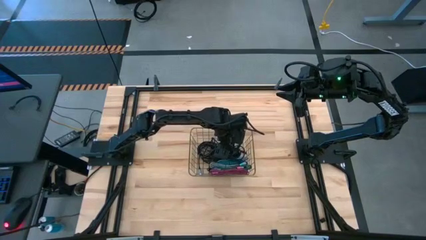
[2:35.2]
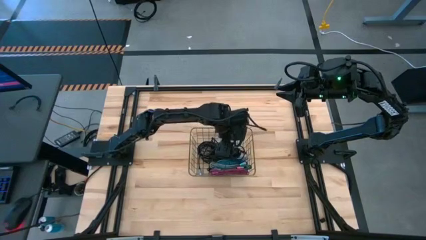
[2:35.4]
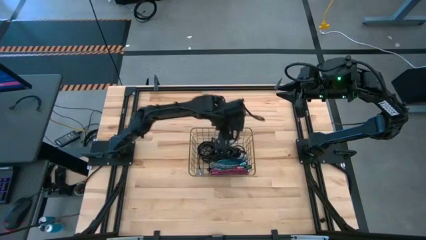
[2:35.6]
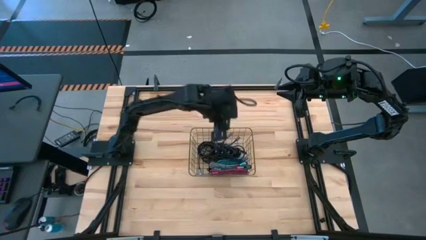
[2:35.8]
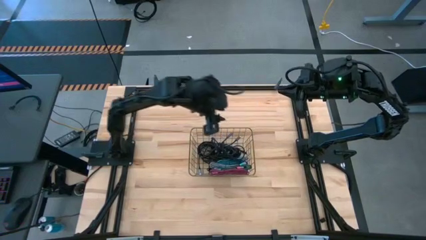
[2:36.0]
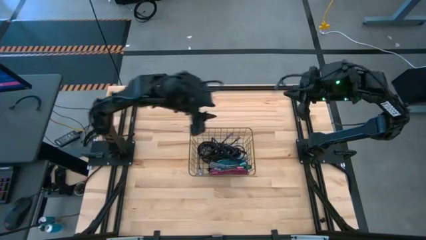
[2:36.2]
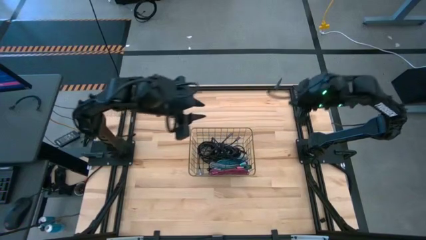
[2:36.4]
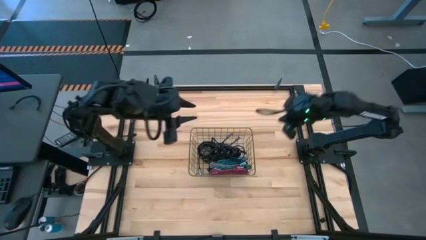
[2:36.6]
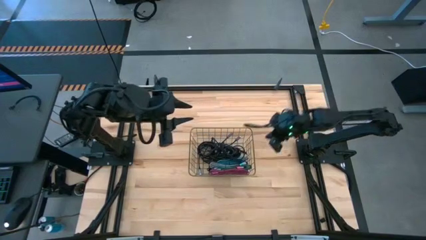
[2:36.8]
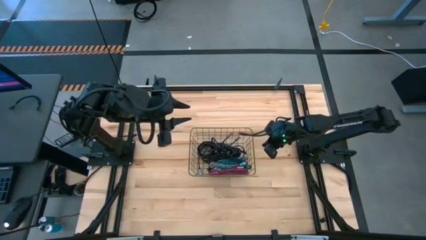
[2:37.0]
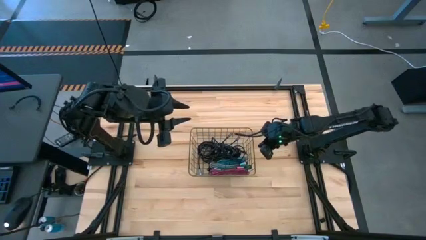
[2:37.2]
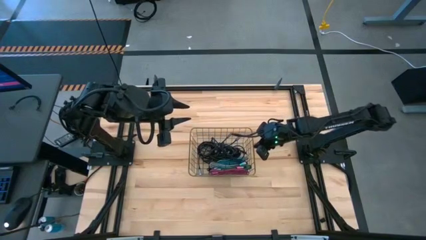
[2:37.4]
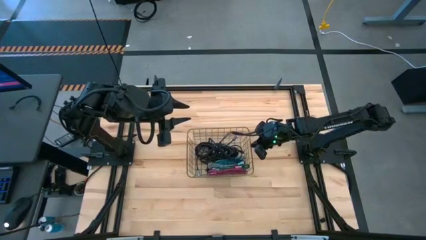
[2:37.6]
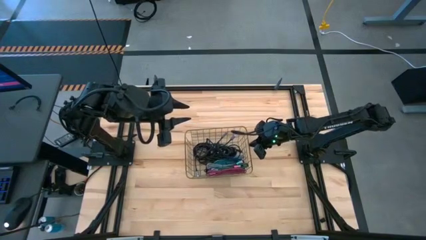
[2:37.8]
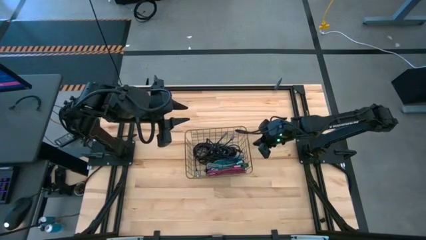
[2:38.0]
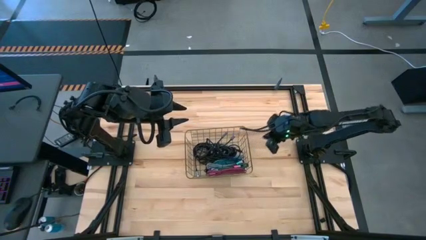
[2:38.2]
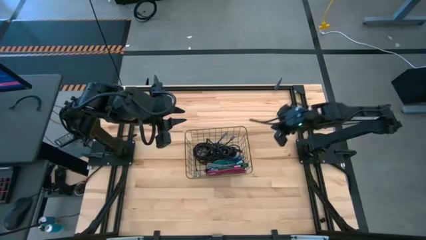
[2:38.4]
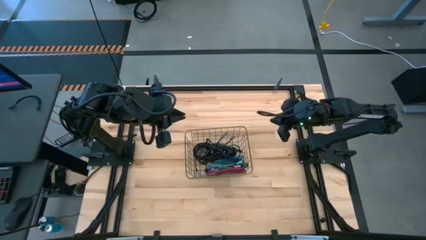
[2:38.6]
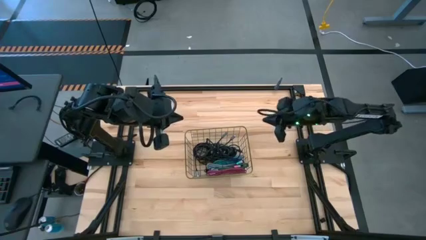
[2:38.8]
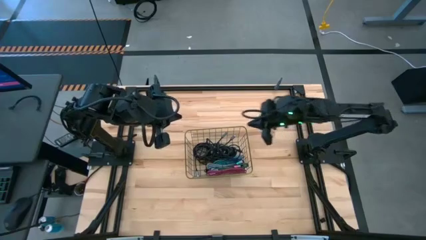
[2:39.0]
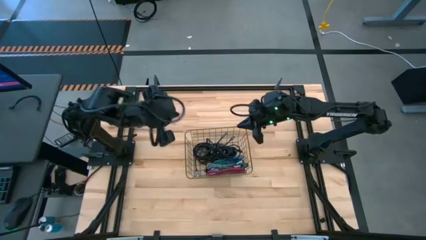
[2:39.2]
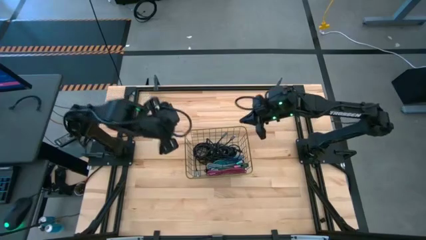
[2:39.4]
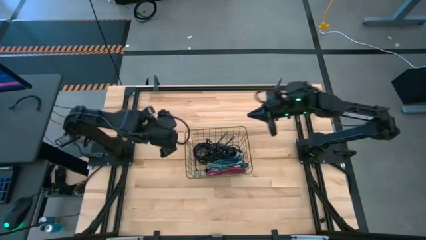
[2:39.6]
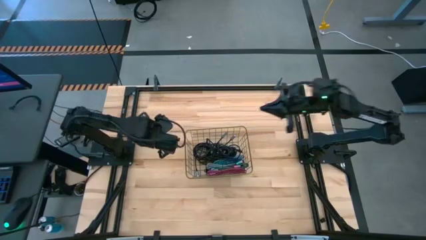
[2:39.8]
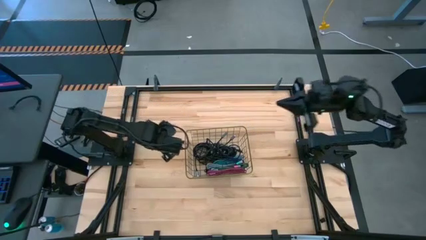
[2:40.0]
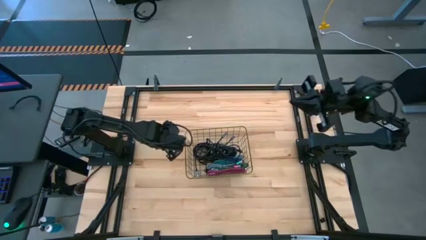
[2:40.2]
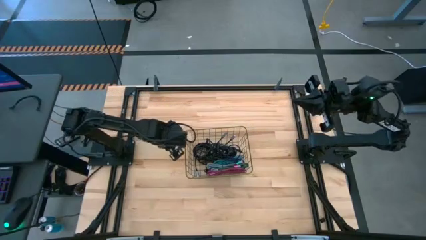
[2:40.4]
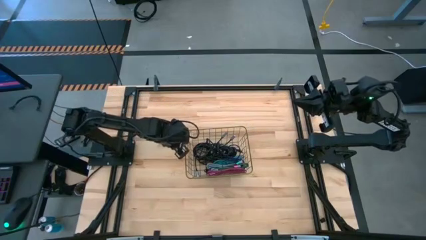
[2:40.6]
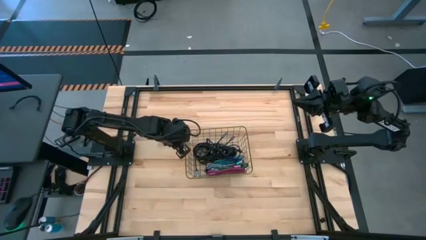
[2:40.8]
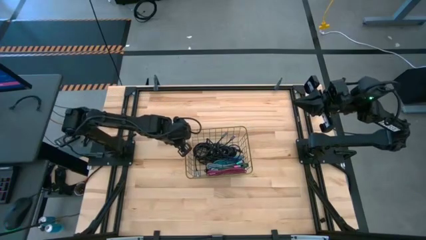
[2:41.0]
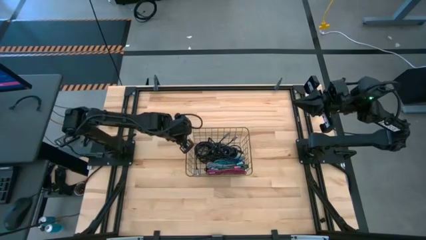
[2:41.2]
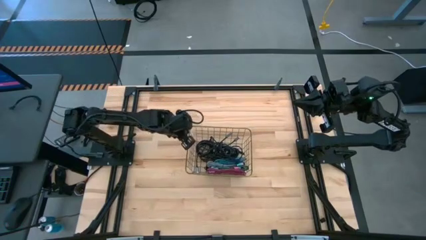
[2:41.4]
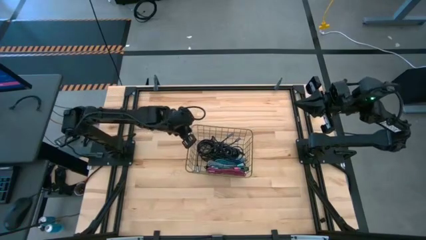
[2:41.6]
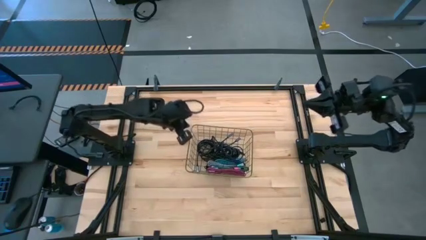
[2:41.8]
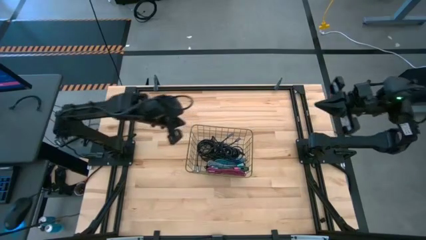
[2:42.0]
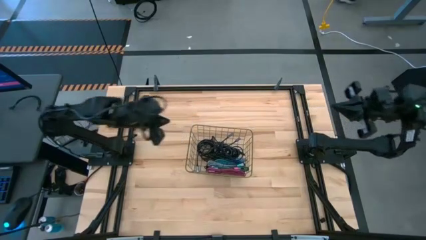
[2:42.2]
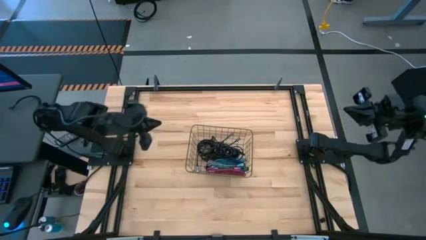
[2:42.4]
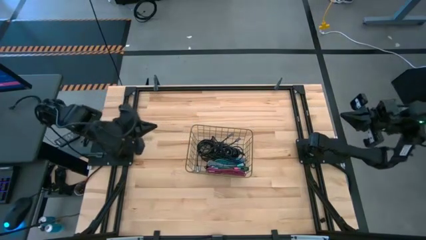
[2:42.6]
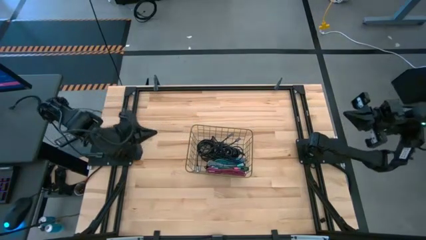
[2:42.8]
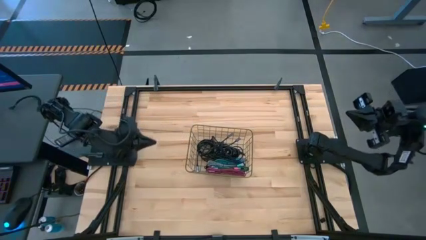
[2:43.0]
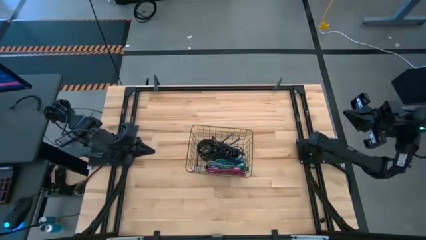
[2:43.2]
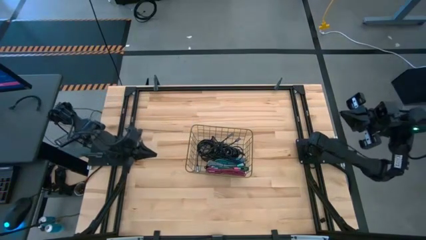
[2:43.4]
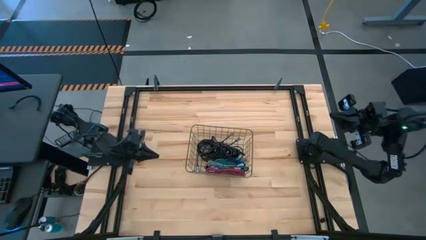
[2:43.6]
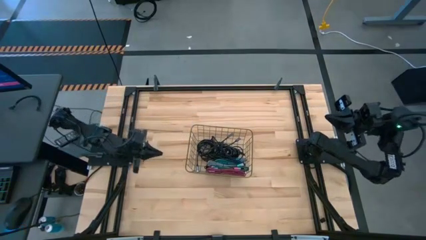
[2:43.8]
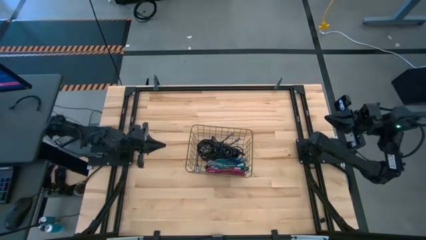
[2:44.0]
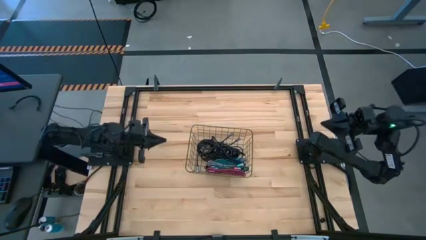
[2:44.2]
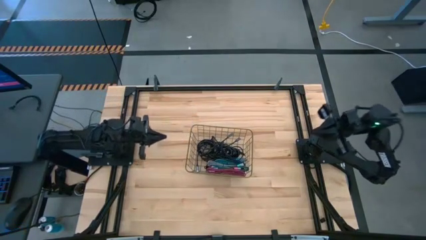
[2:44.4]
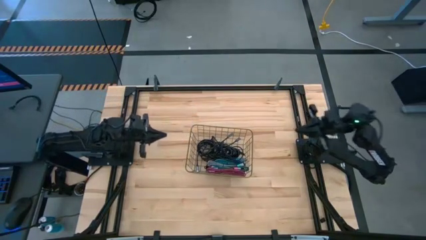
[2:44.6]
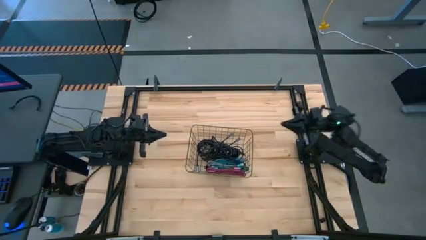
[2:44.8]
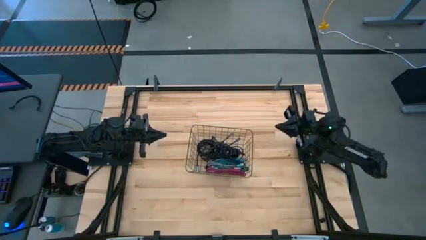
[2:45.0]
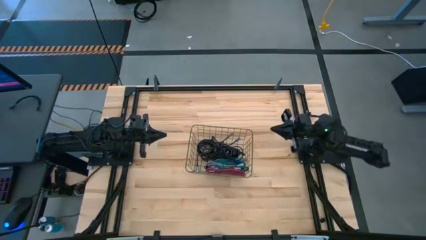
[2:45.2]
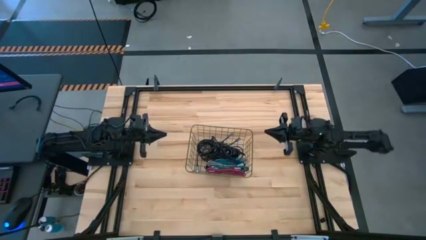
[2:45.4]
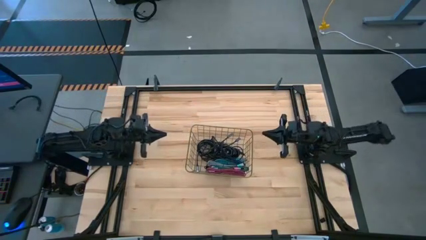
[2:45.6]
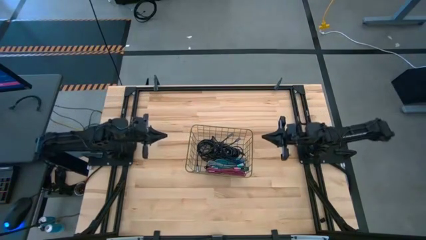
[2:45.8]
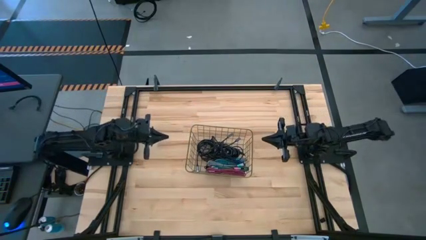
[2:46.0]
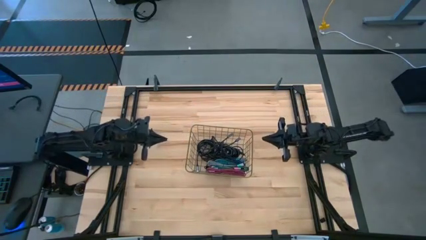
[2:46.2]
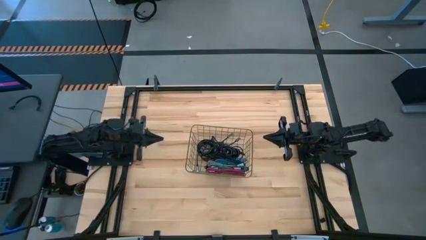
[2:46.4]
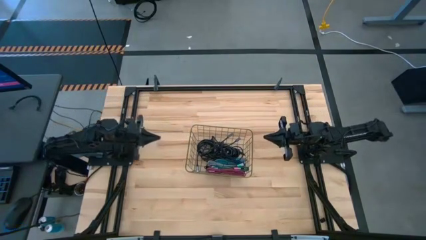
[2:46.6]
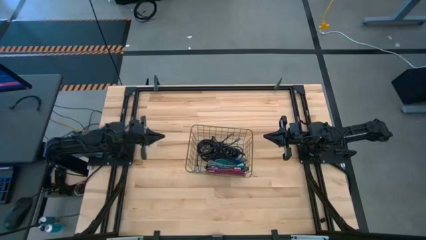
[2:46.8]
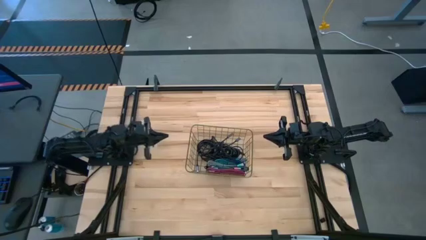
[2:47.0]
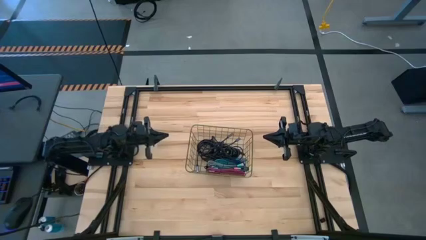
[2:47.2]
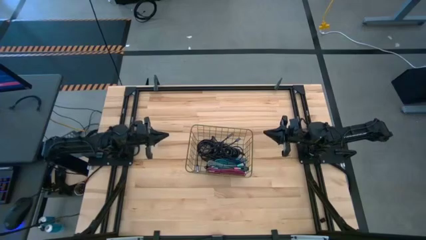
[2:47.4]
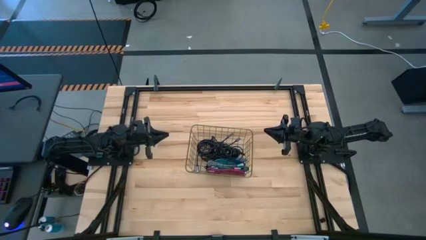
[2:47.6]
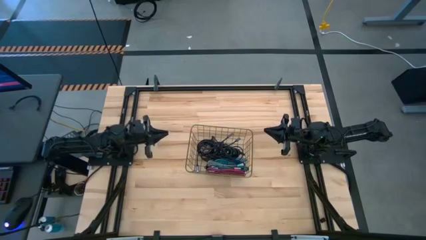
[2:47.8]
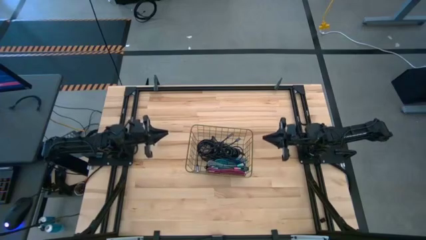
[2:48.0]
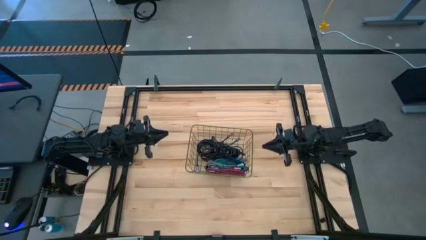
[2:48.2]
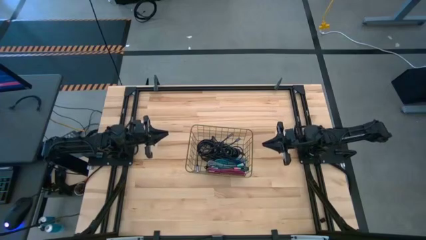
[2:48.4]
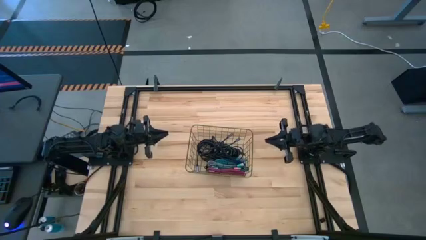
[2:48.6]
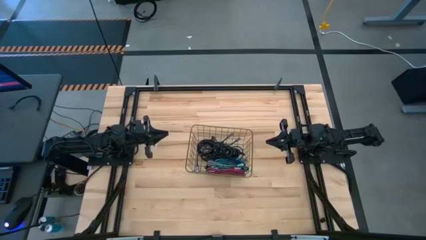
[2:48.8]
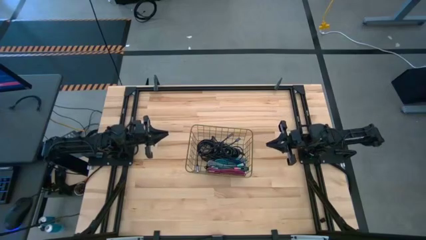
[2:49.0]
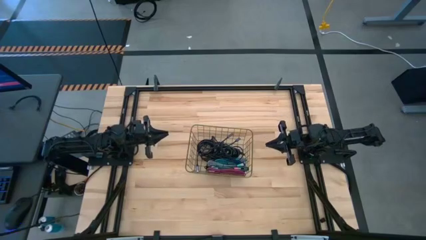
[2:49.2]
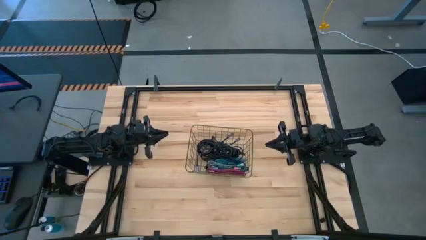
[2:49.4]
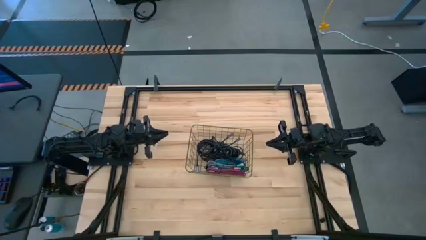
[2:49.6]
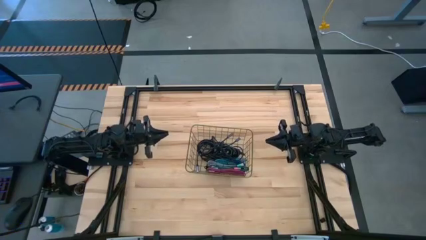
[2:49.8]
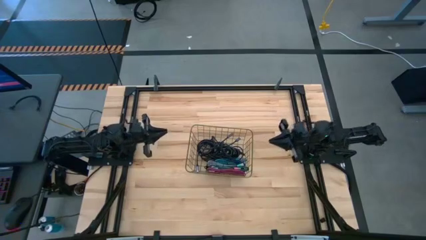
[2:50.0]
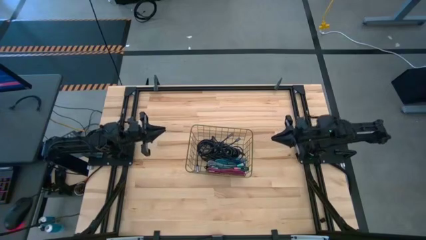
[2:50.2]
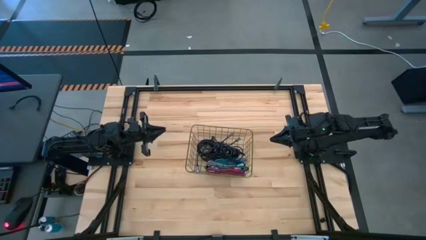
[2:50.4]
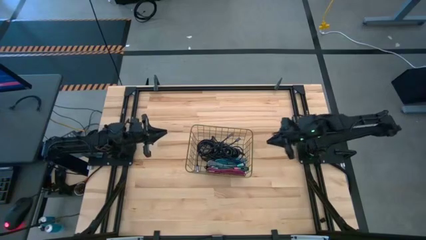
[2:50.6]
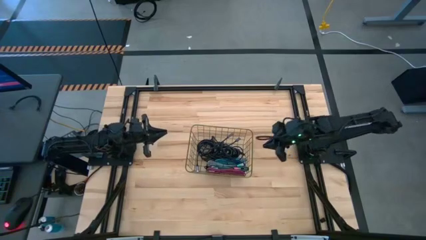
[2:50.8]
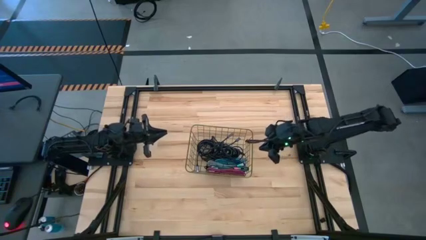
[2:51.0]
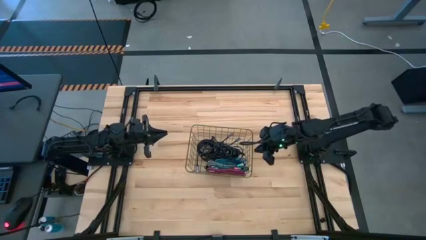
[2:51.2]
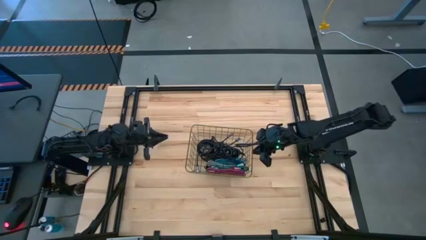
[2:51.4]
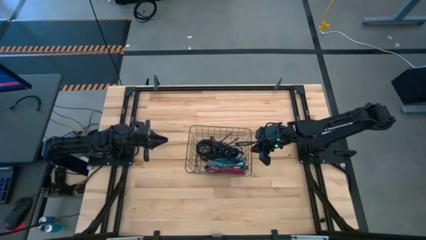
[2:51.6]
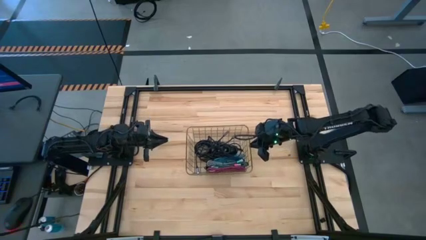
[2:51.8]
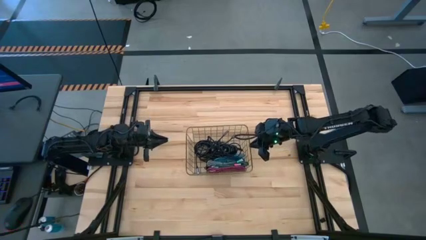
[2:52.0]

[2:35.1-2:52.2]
Task: Pick and place USB-C Cables
Adjust the wire basket
